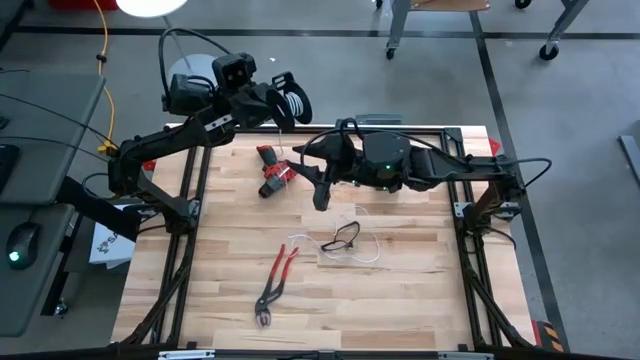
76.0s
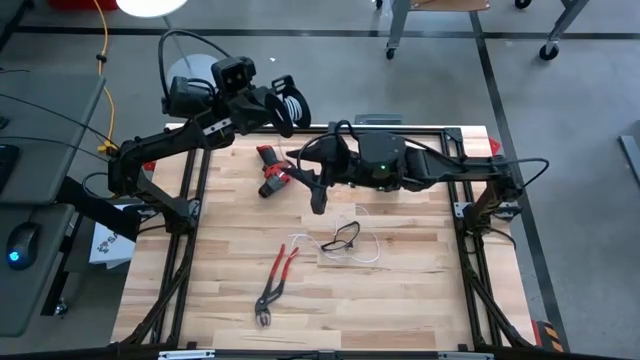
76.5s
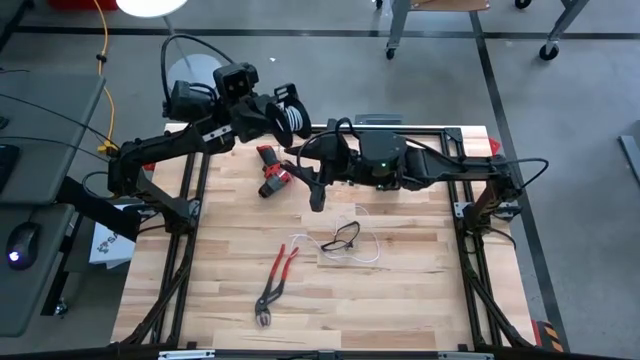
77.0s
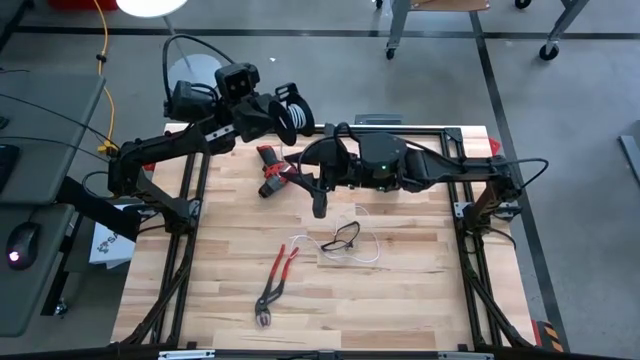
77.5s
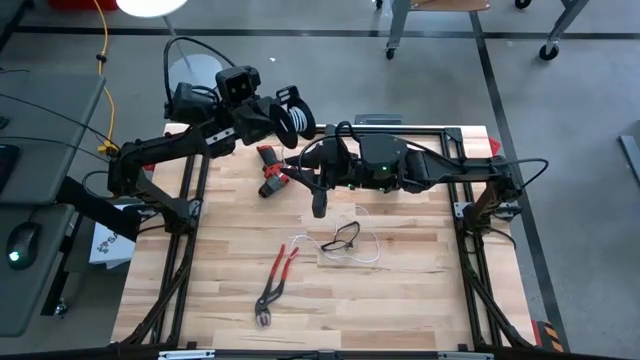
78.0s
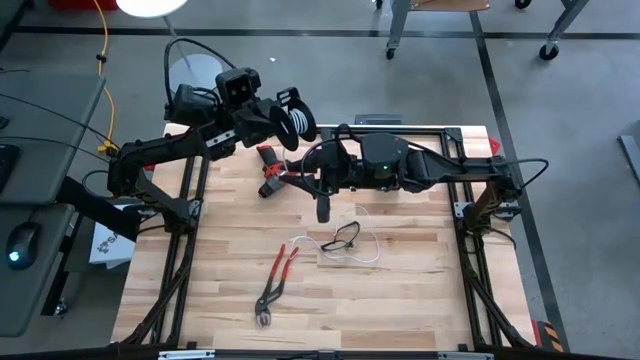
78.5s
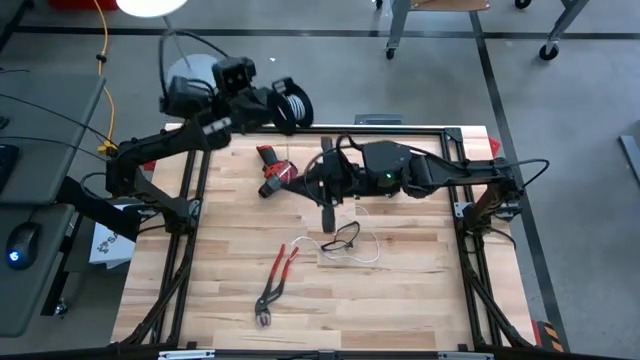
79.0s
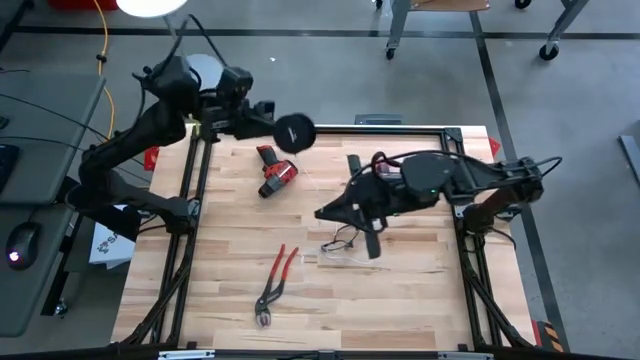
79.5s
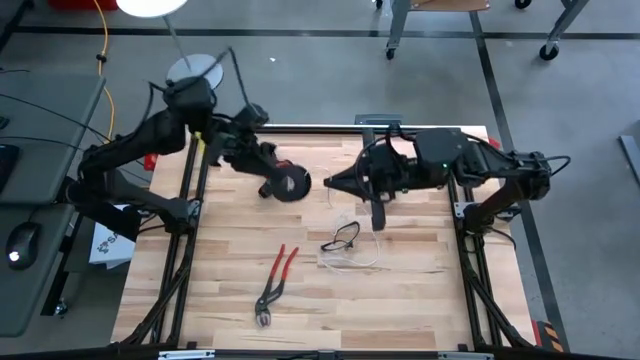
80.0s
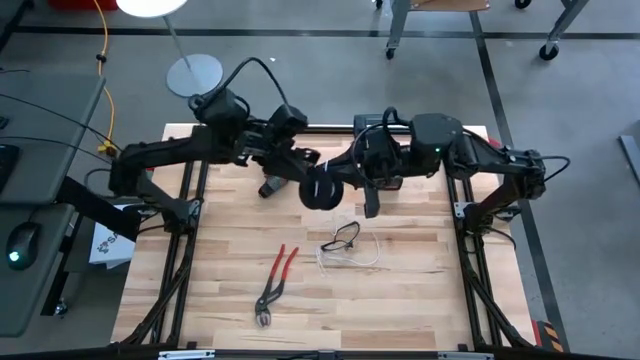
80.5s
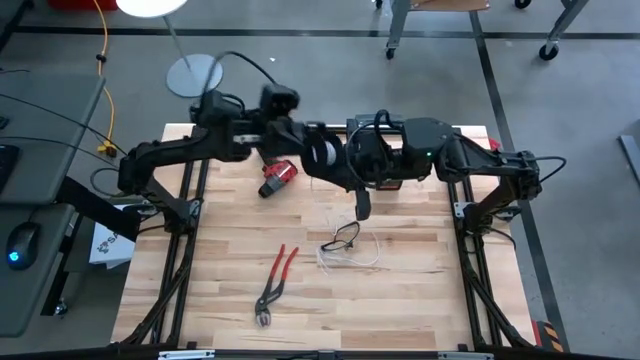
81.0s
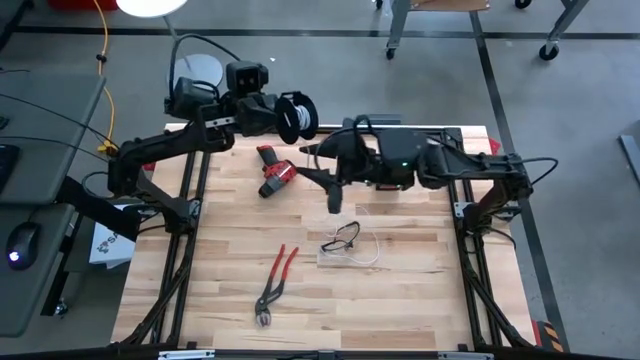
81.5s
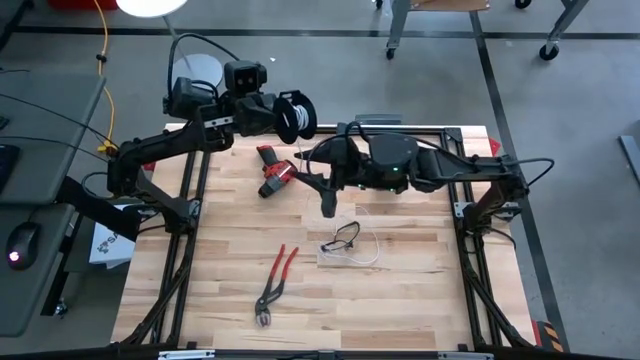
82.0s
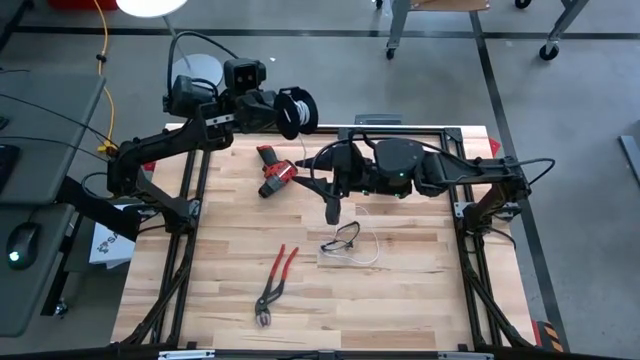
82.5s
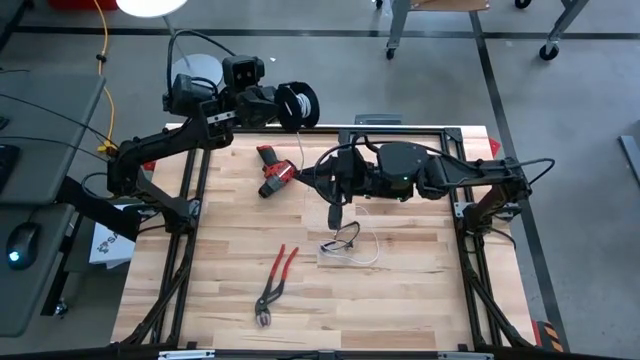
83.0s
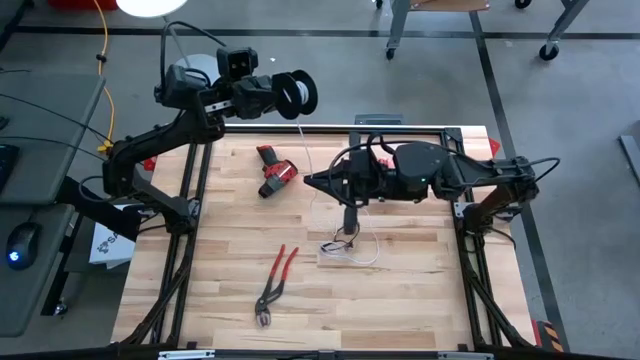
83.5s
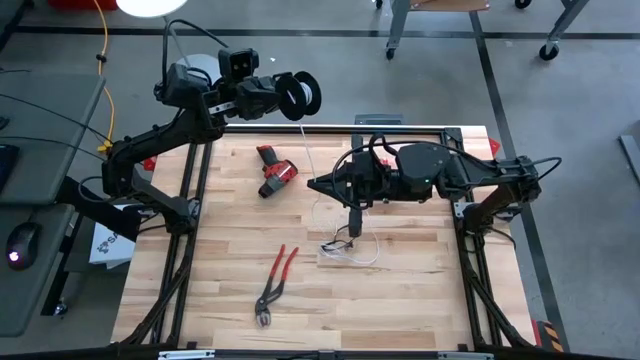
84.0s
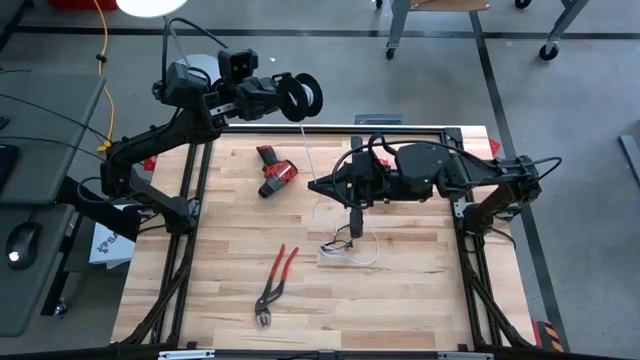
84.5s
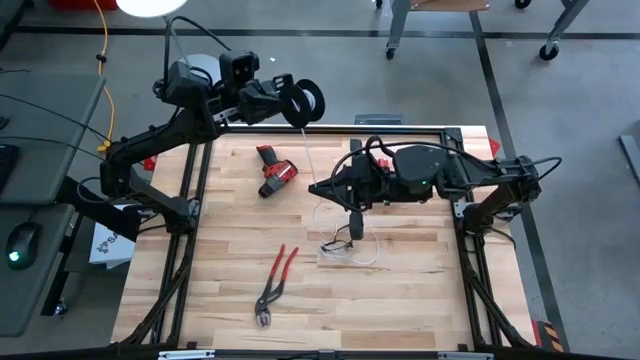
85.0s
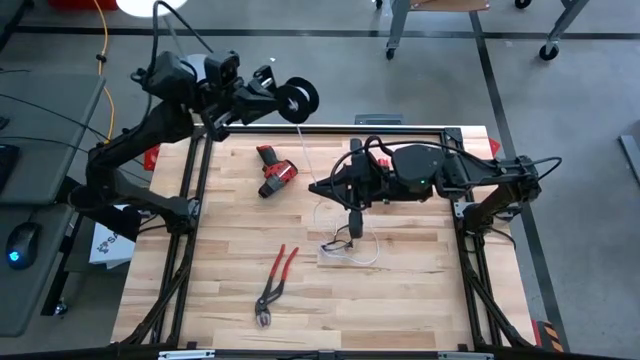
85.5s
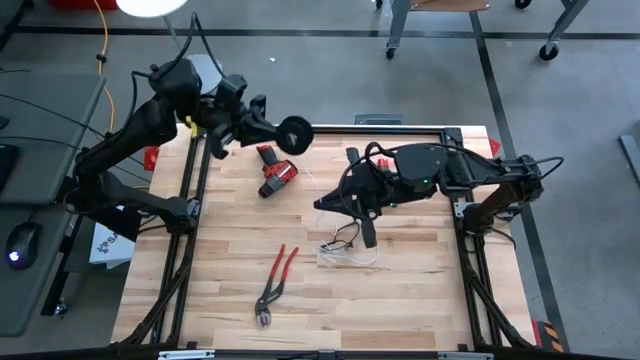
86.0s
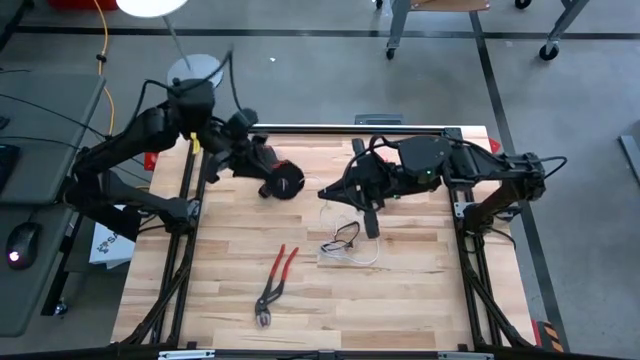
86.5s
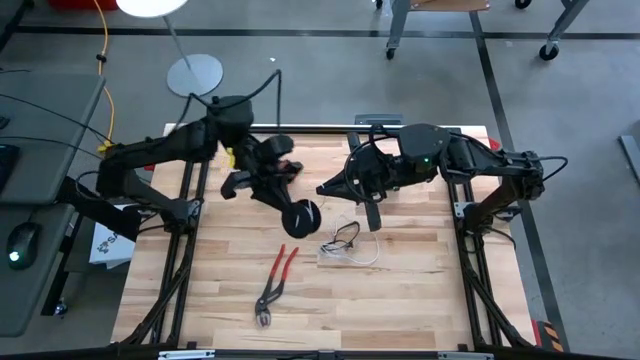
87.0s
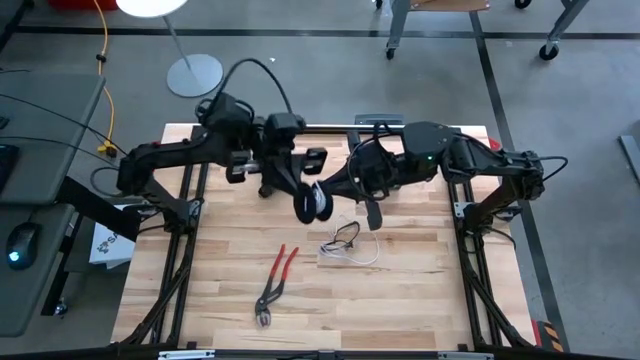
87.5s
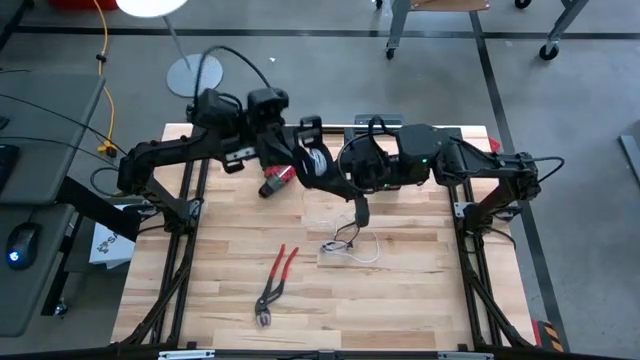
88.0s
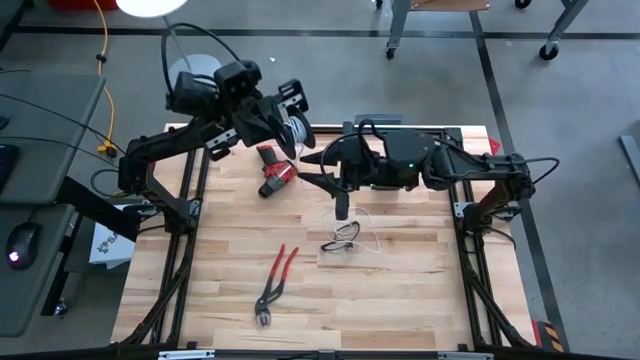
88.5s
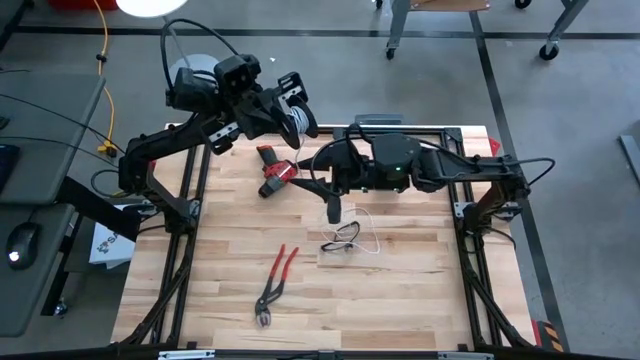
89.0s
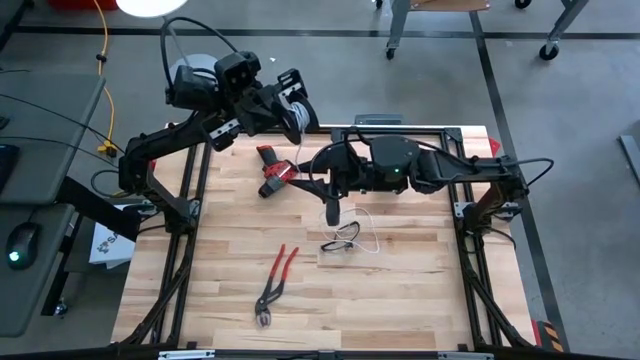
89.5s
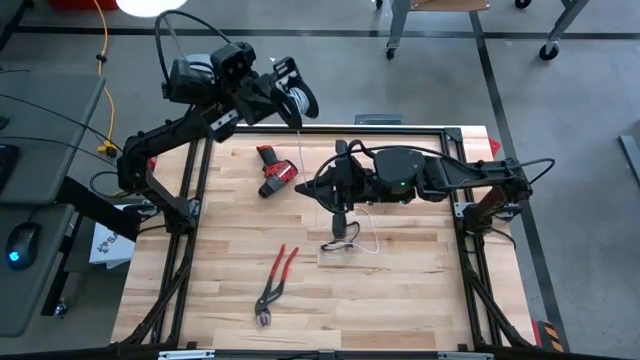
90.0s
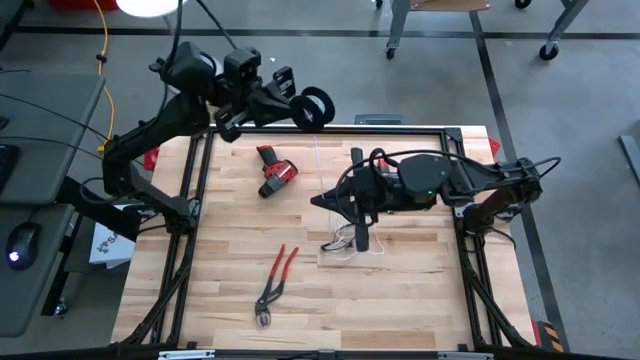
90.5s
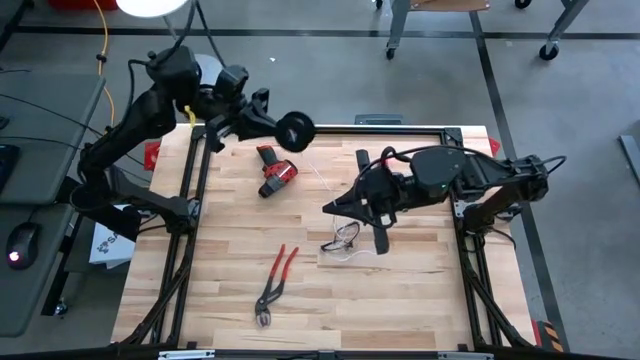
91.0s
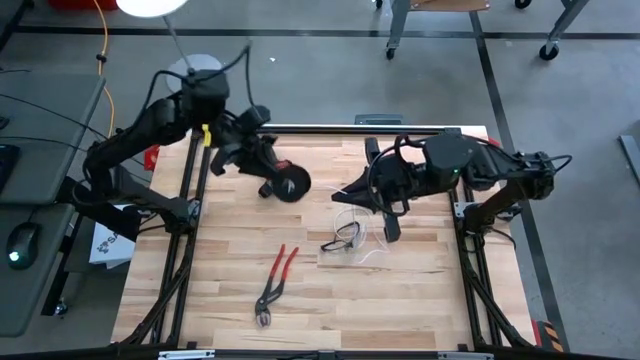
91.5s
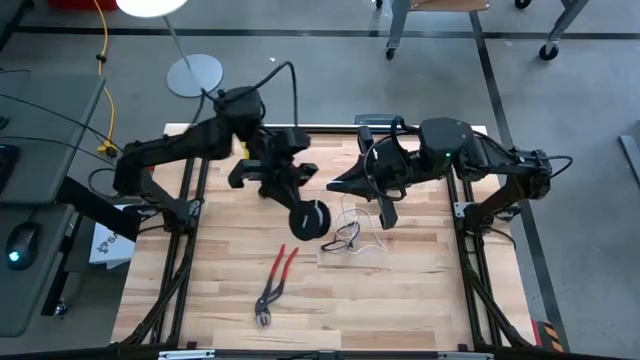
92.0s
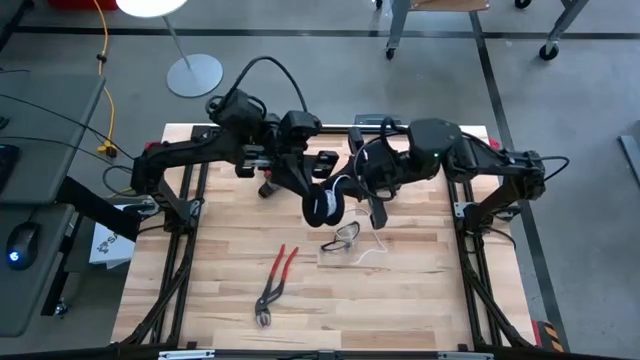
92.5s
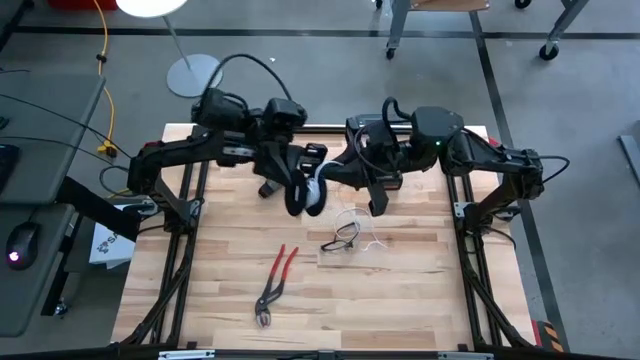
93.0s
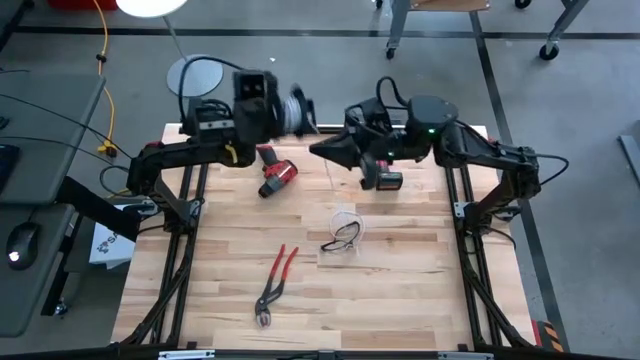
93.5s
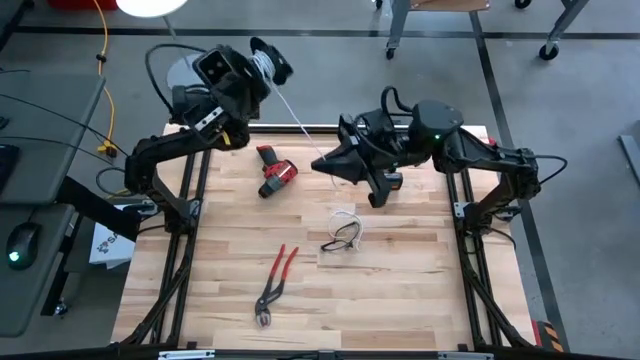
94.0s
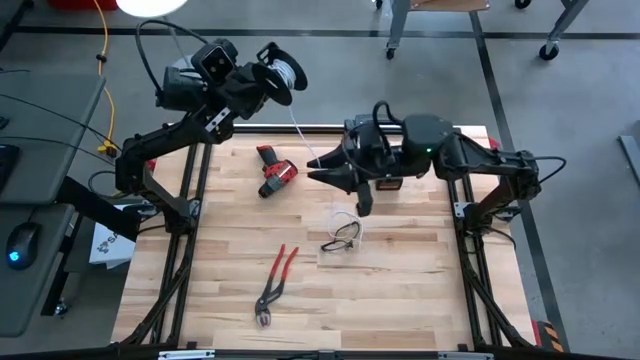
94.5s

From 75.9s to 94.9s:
Task: Coil cords
Coil the white wire onto the black spool

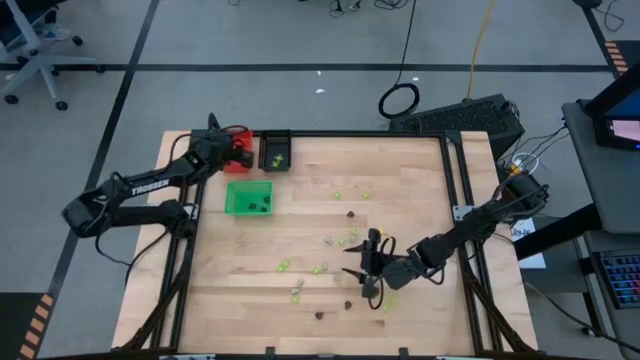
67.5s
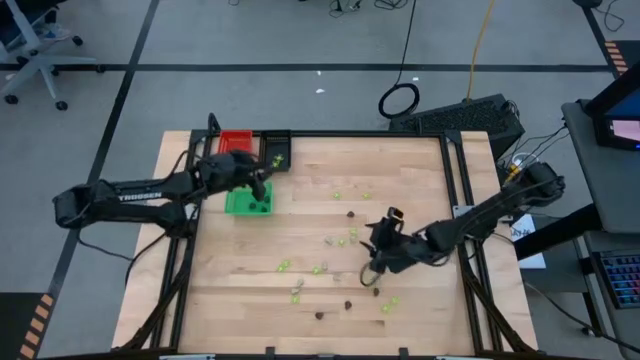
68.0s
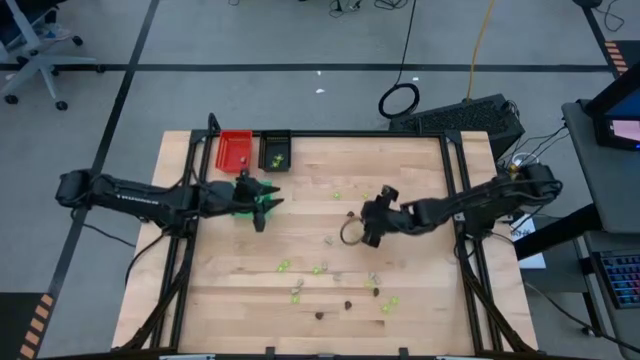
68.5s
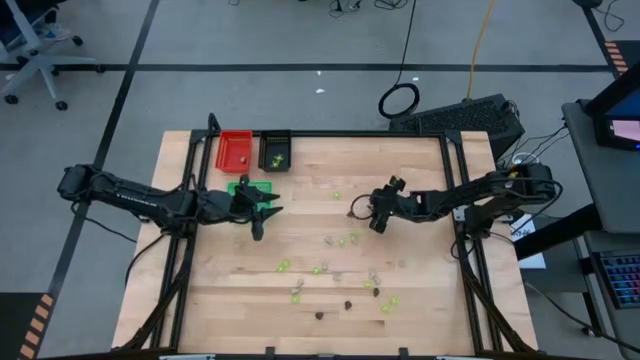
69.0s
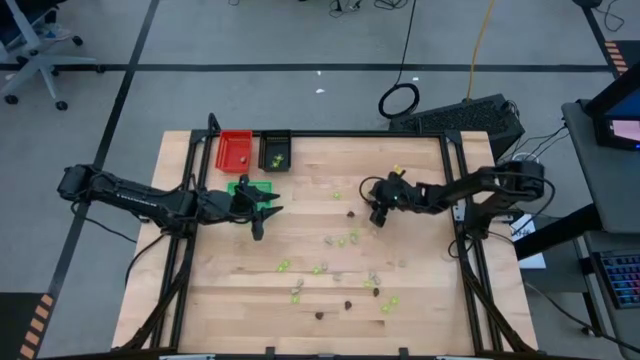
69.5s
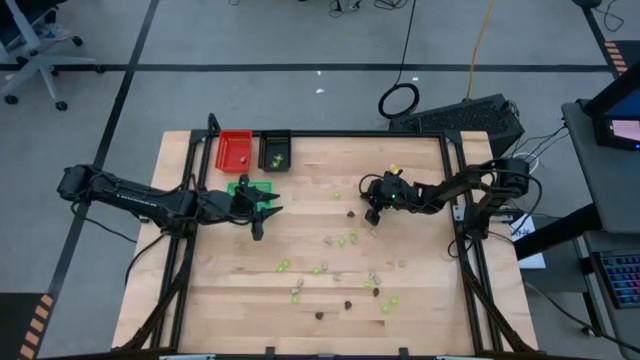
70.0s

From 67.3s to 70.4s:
Task: Sort Halloween decoration
Put the green spider toy into the black bin
